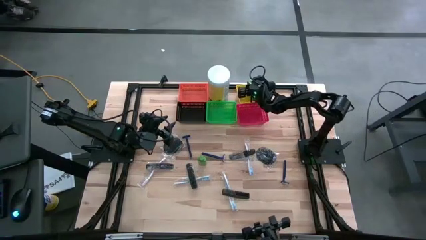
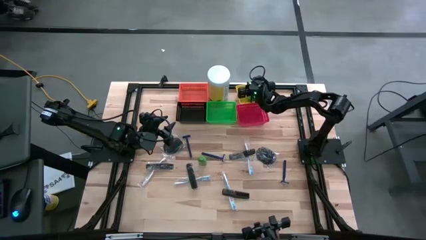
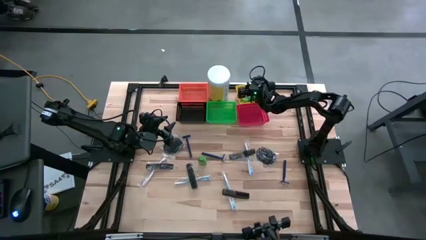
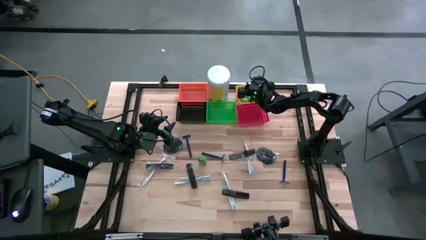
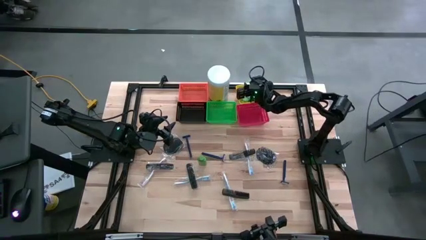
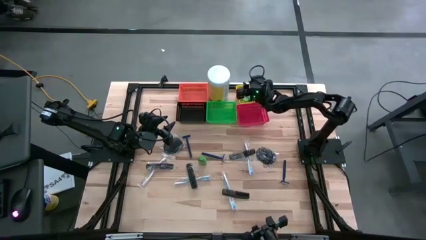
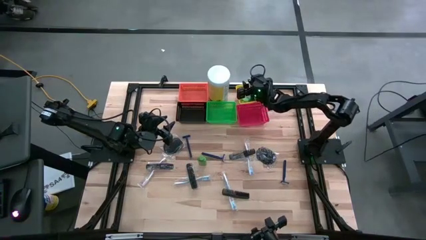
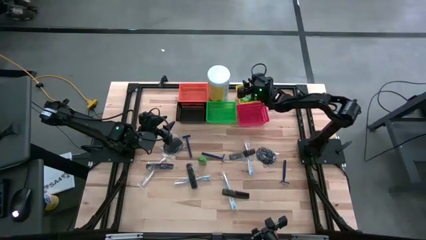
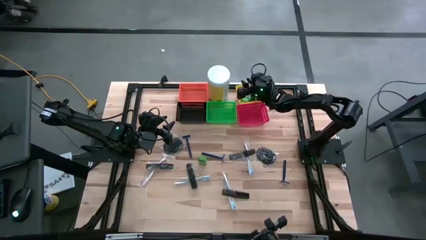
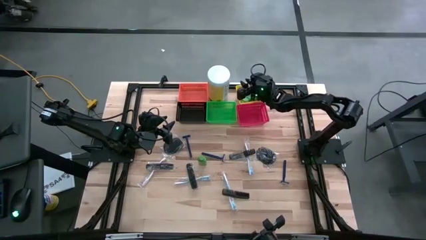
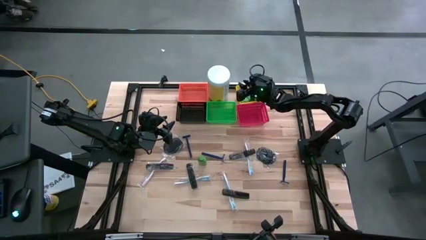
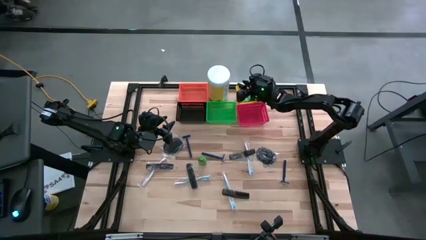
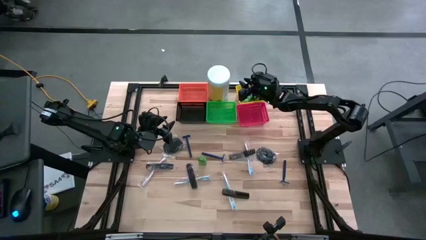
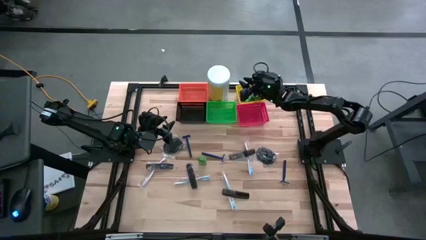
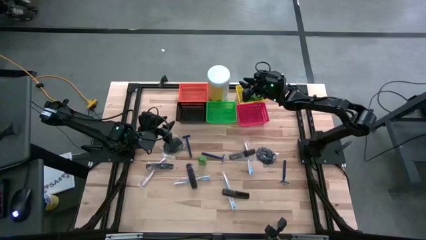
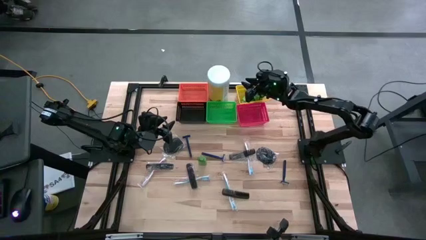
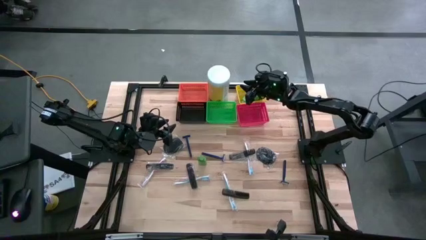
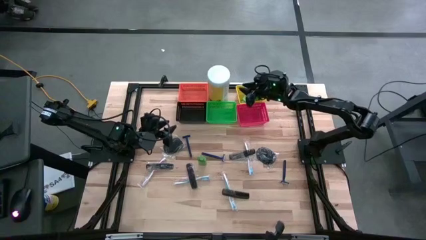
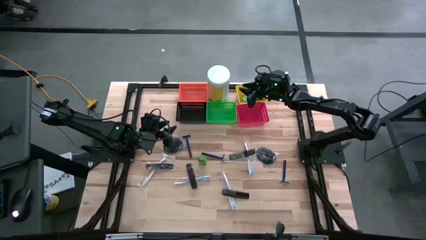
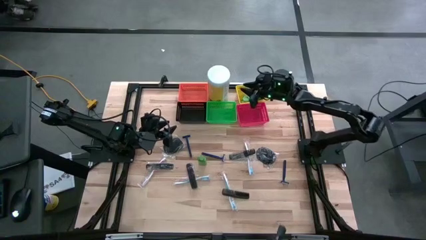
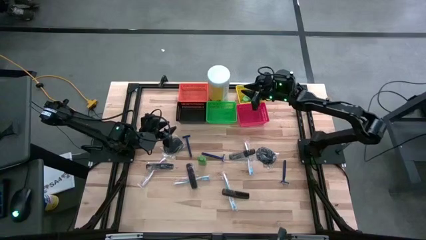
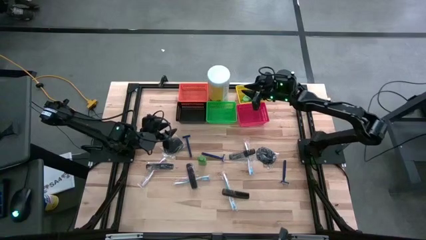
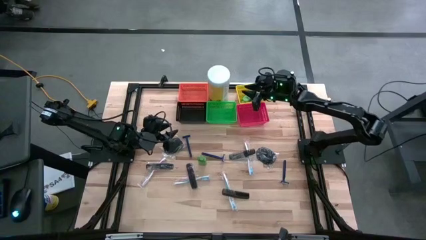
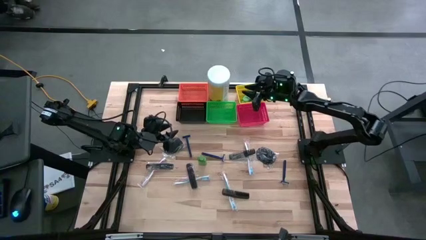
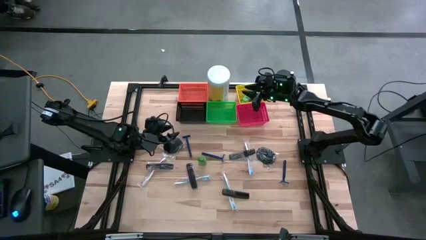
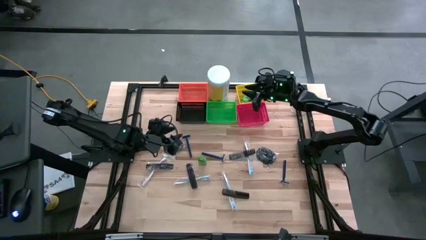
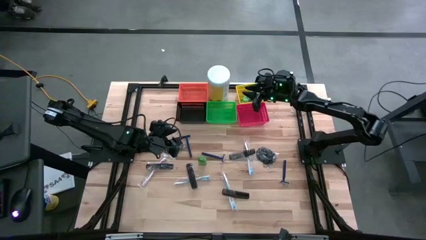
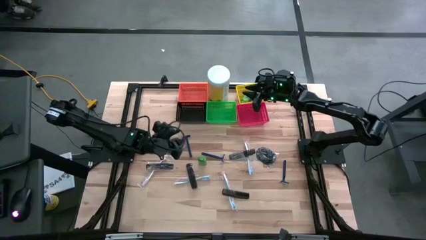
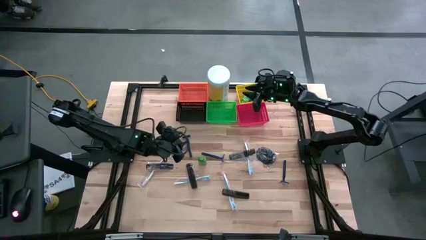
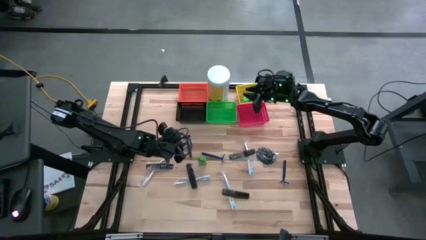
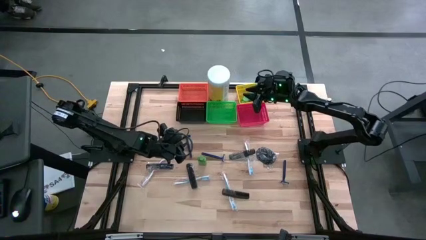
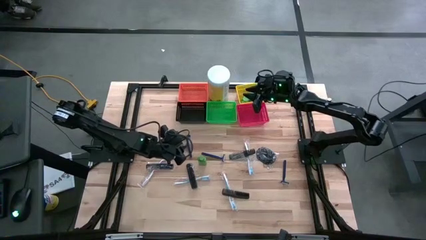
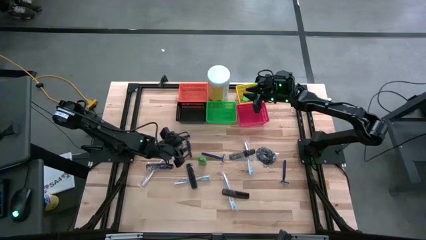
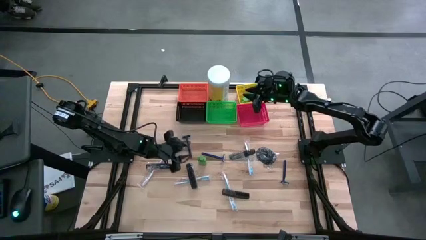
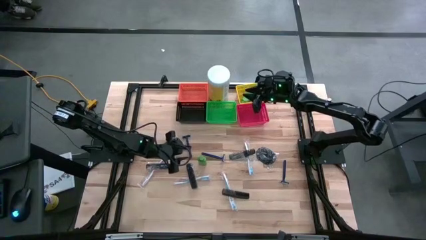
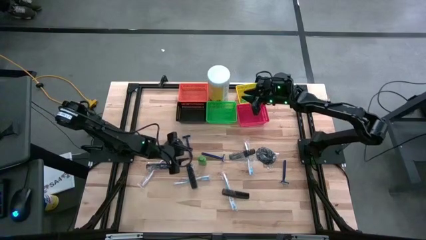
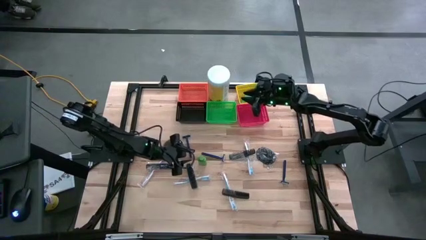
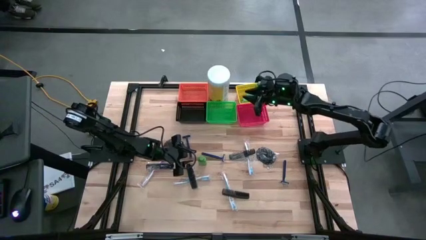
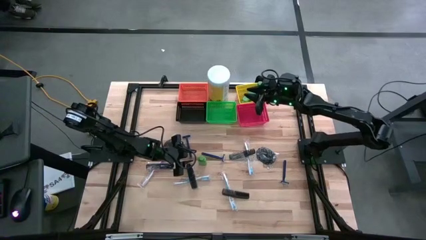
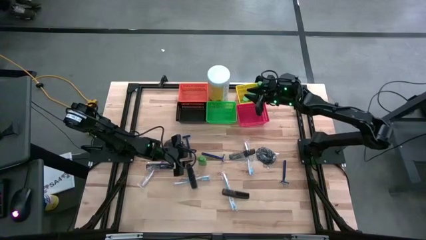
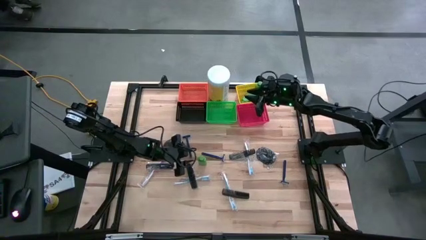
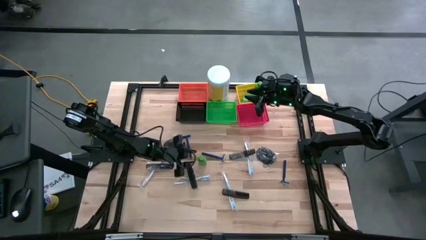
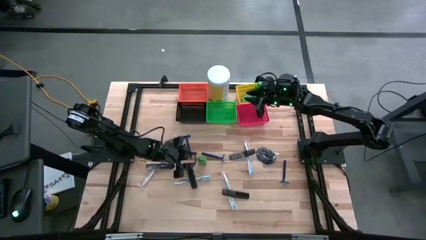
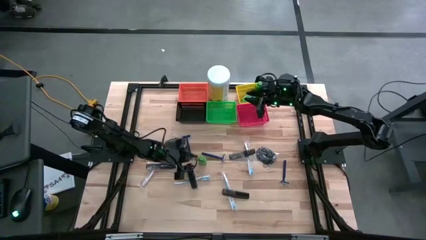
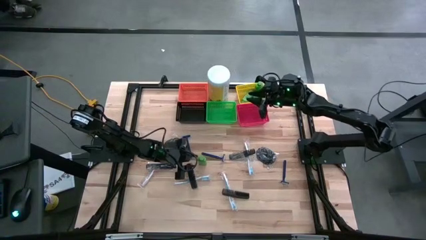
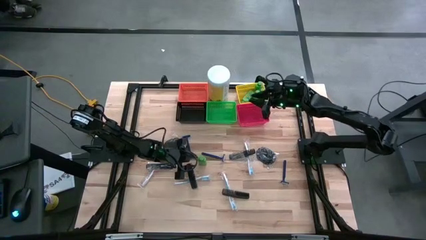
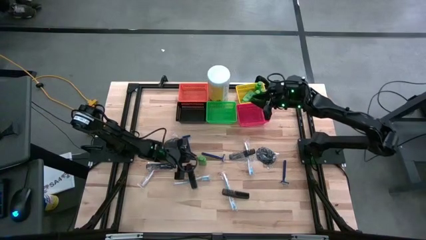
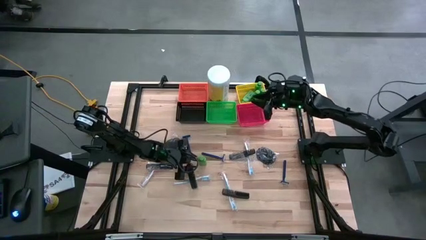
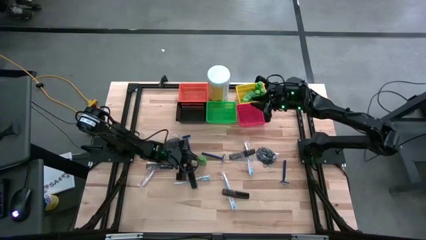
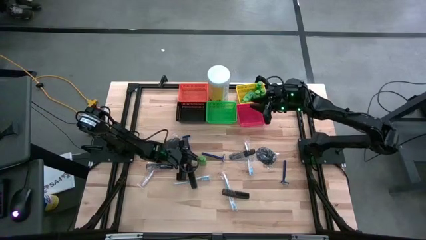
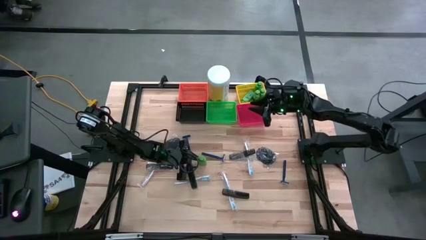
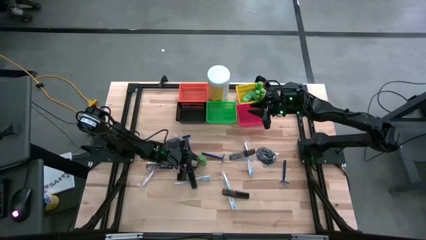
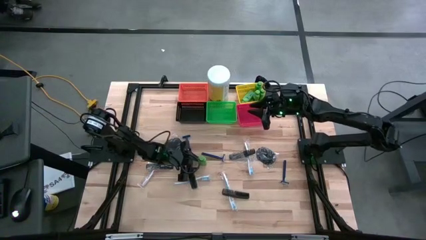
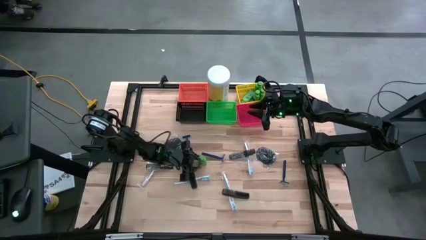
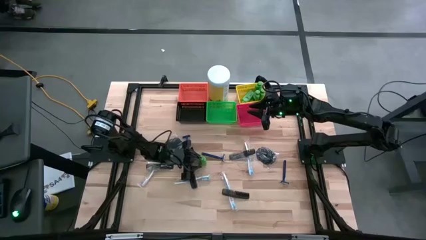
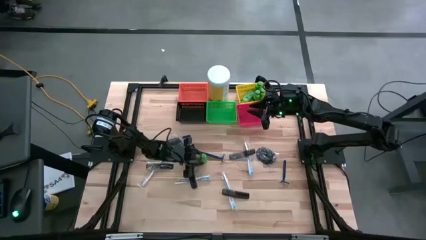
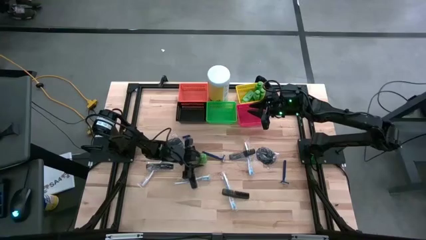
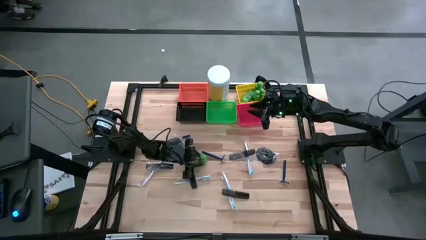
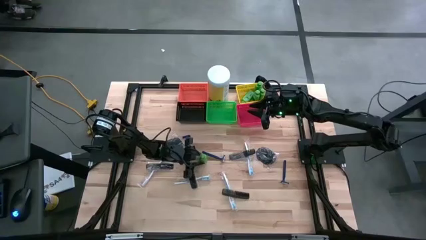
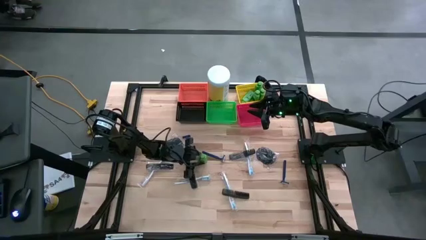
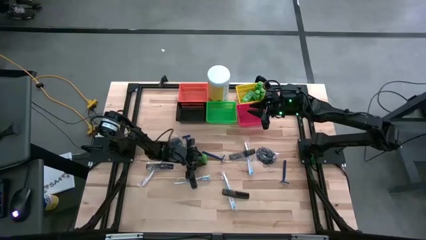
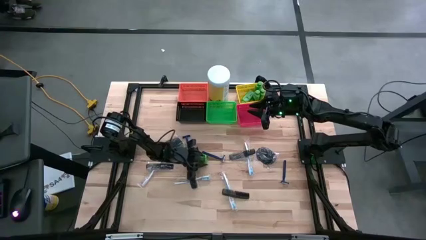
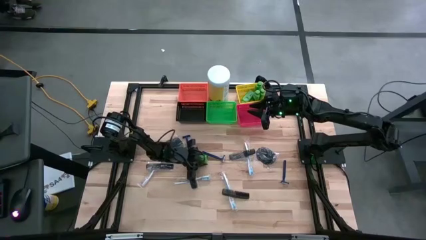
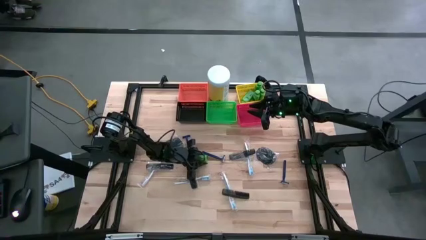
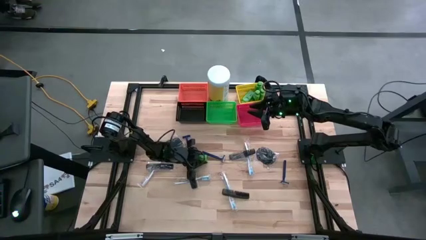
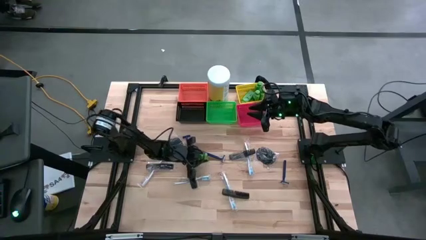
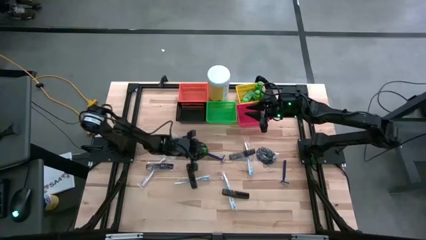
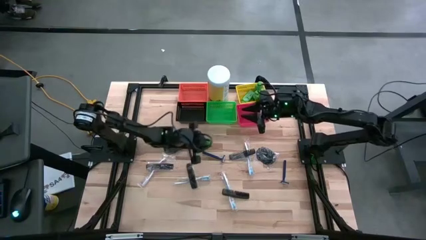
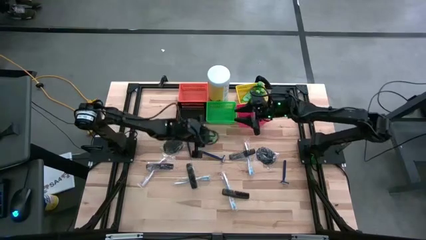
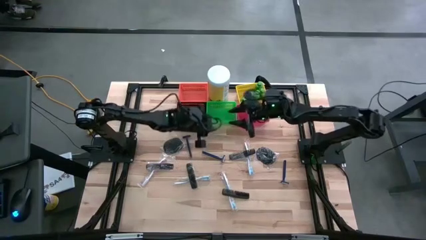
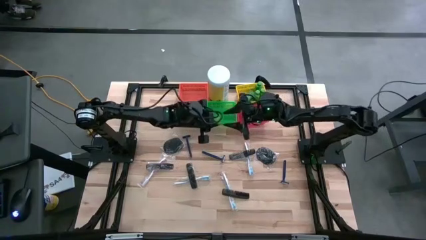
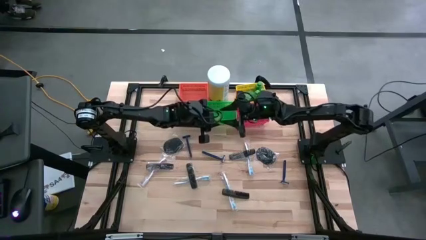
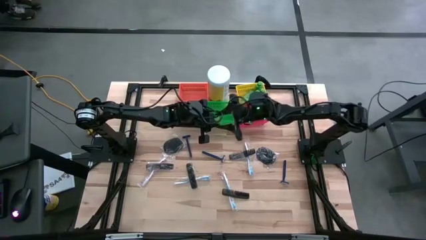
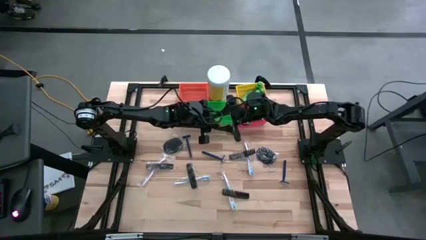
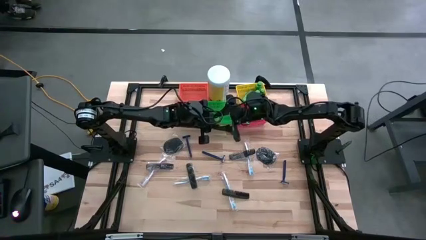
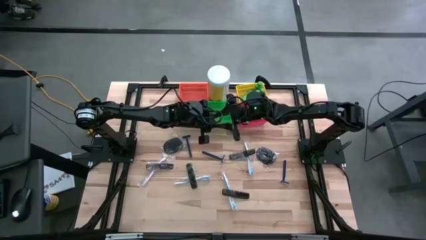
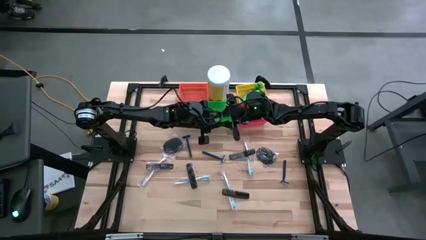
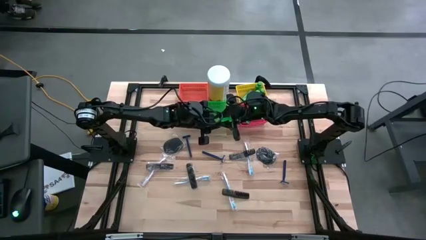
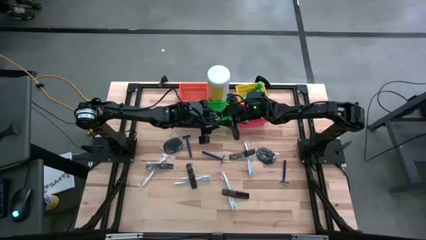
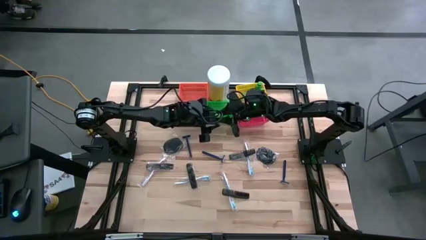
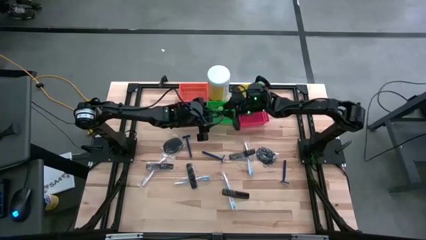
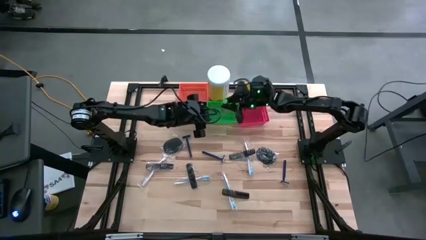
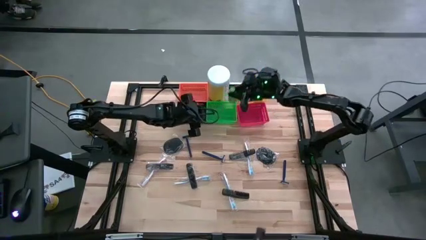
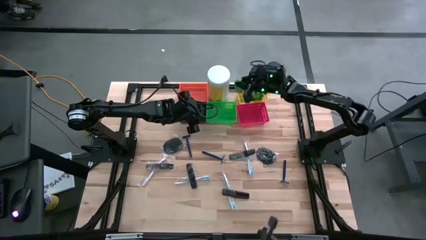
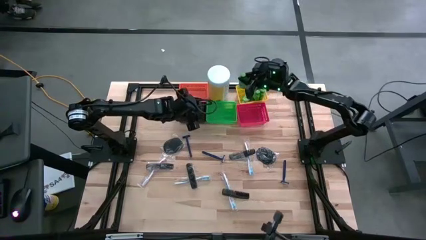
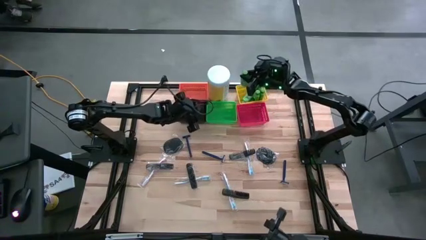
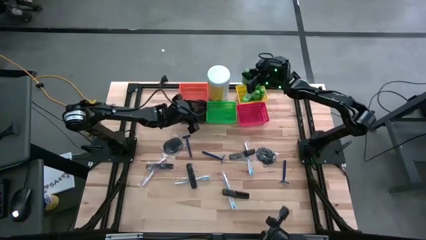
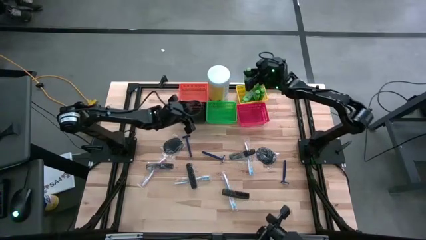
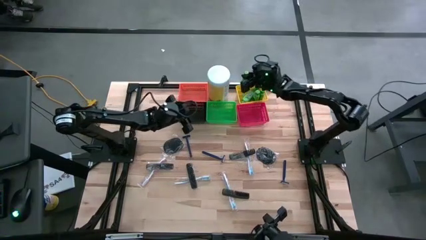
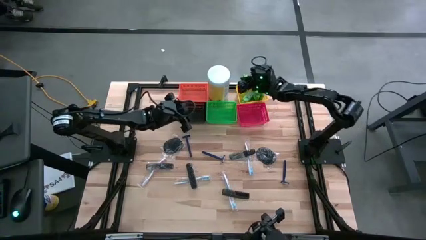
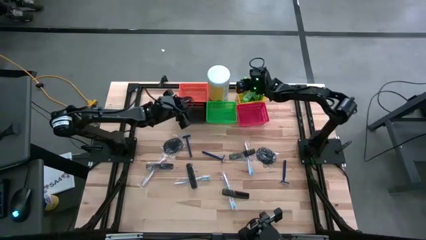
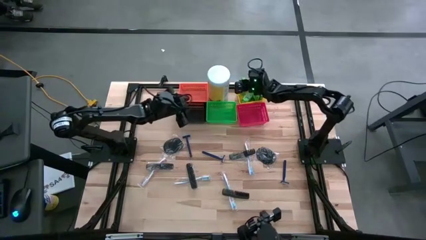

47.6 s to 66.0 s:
Task: Pick & Place Travel size toiletries
Put the green shampoo into the yellow bin
